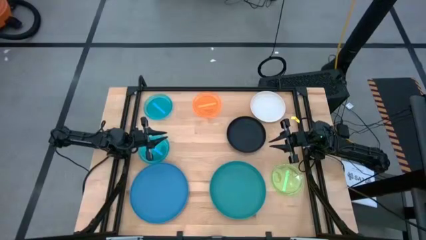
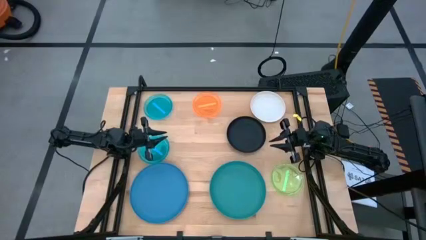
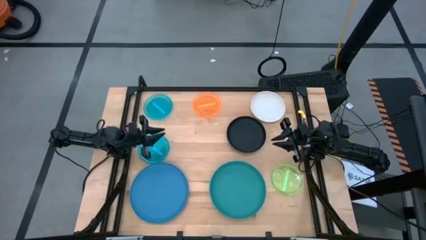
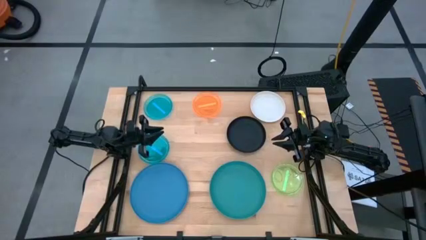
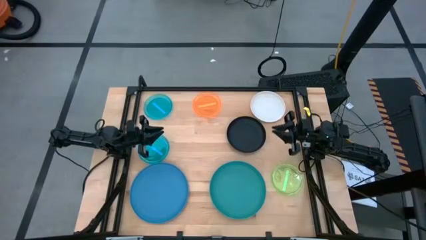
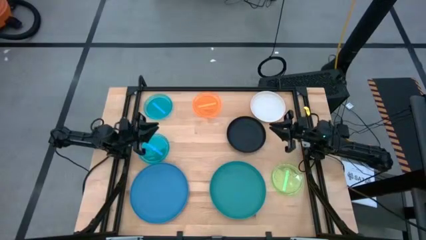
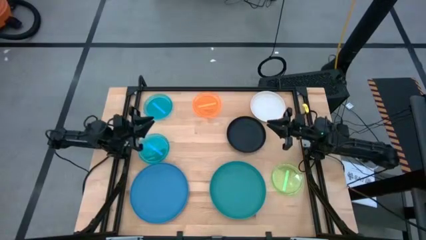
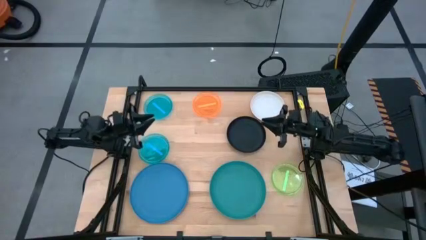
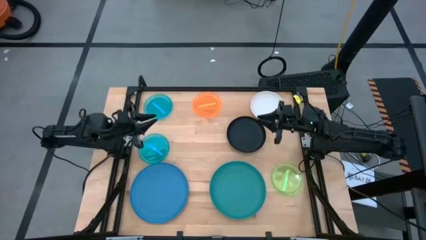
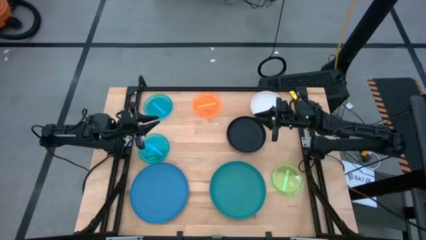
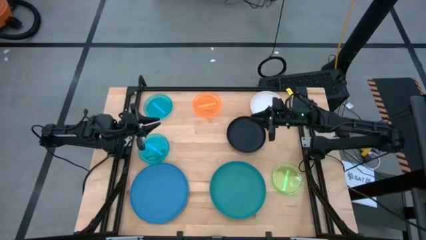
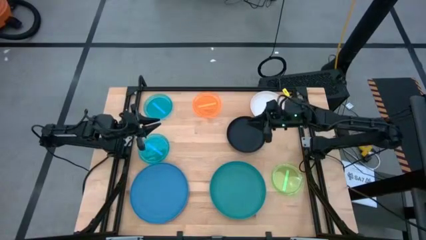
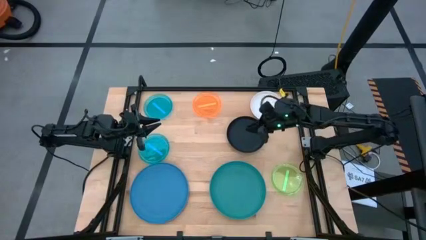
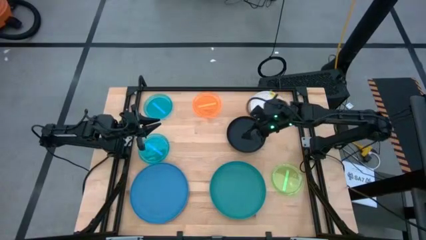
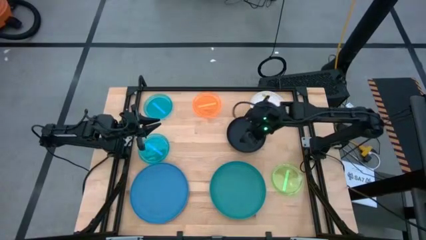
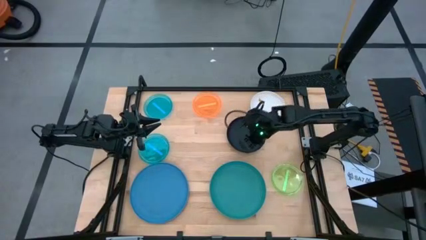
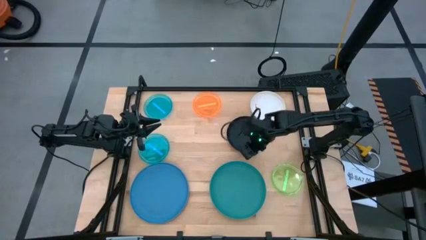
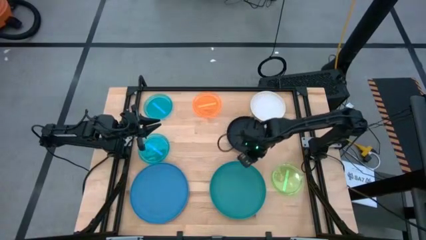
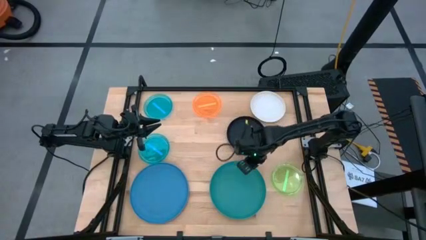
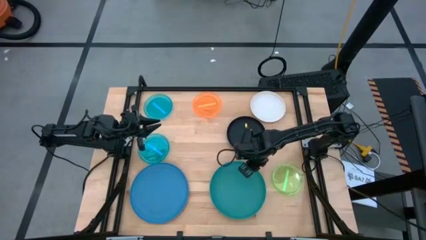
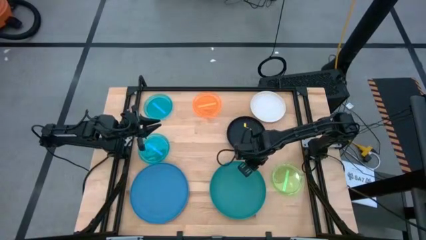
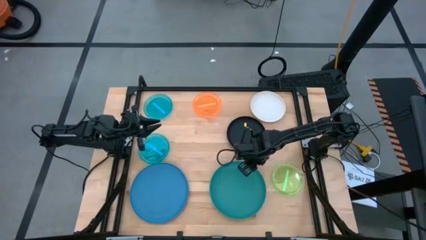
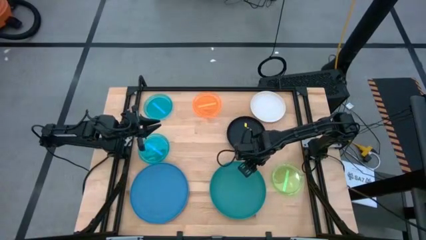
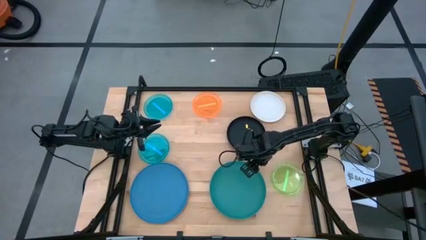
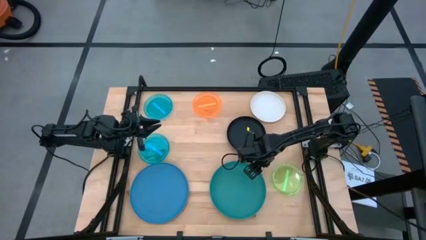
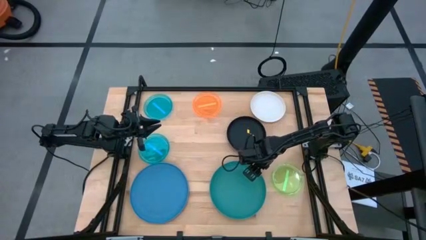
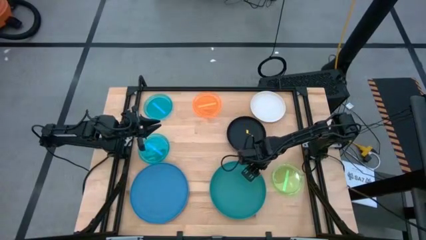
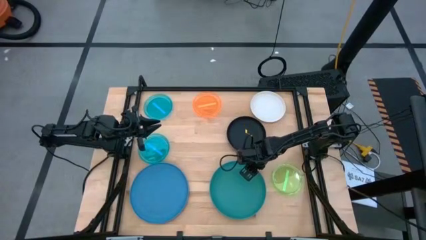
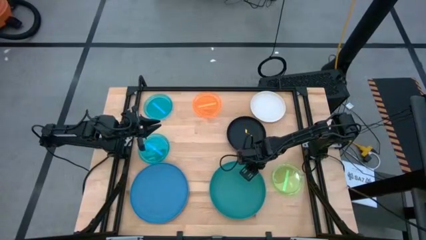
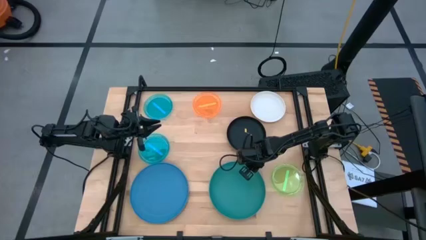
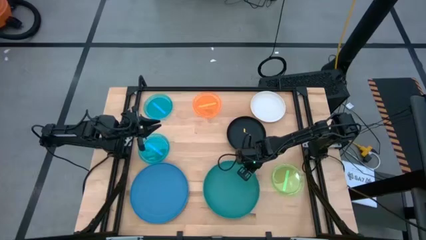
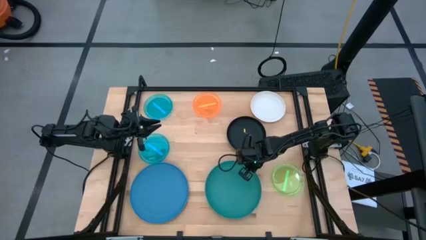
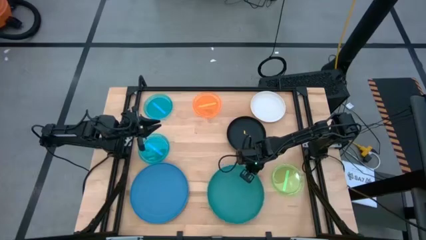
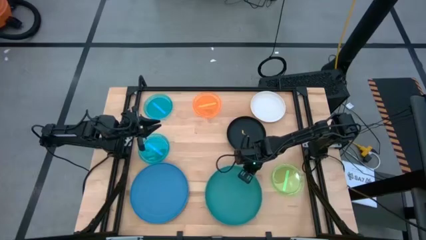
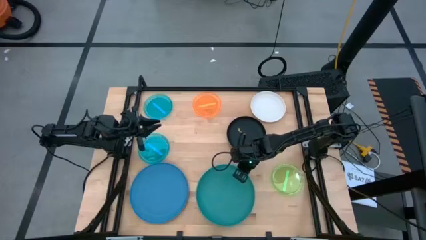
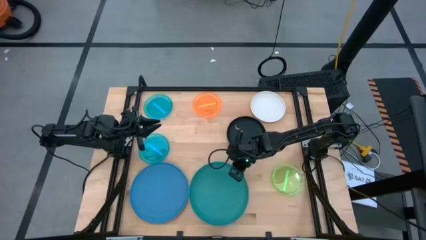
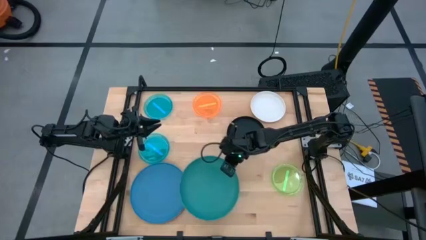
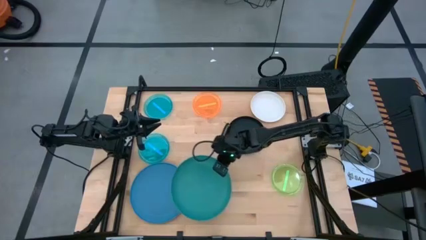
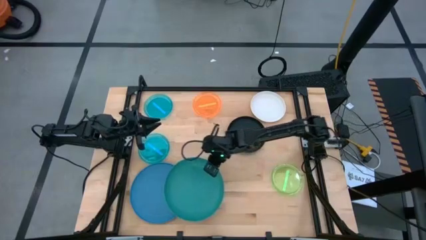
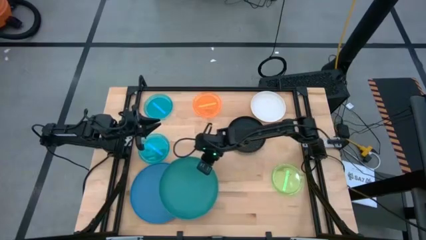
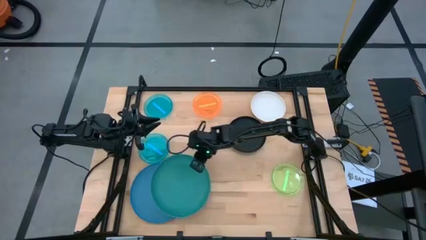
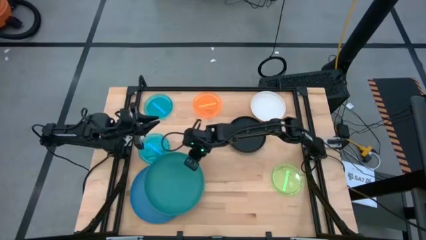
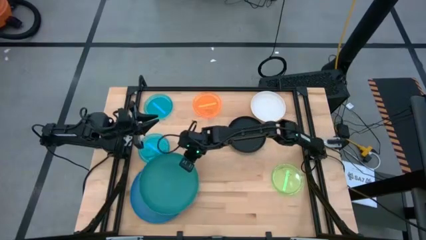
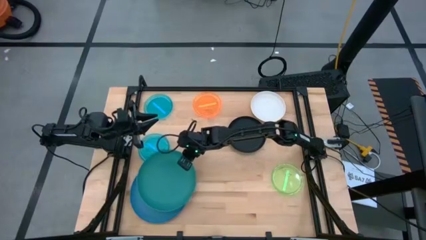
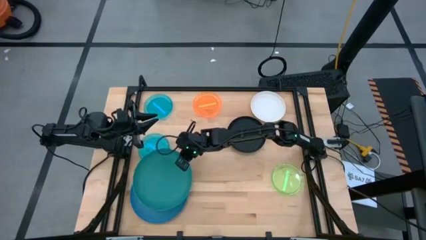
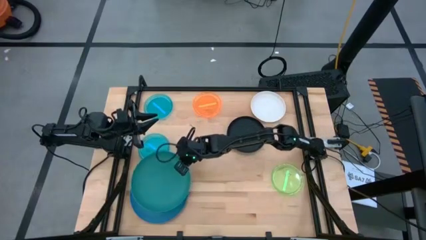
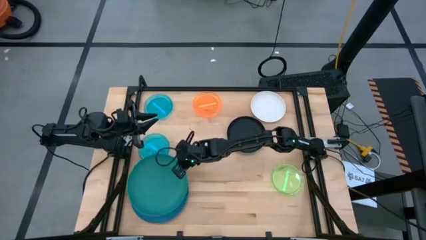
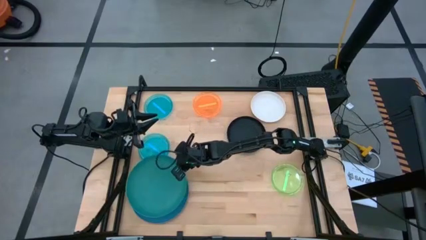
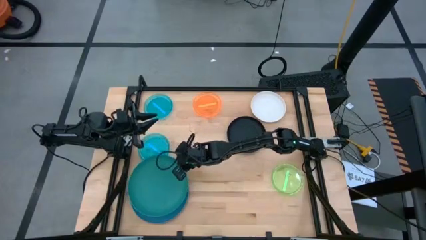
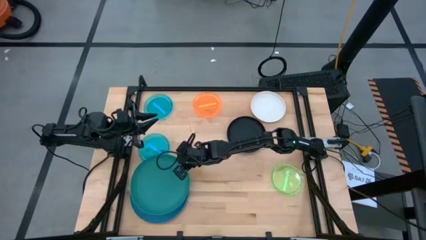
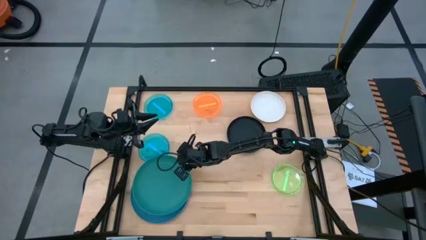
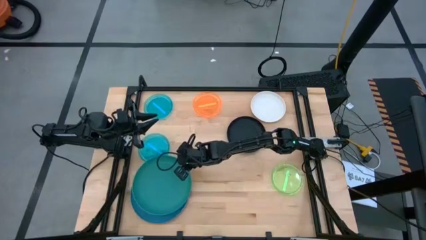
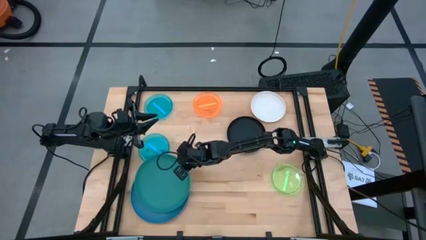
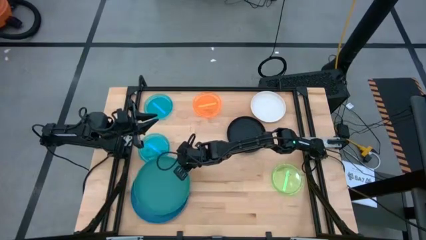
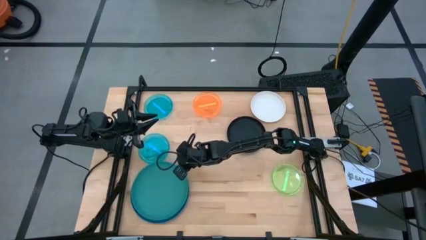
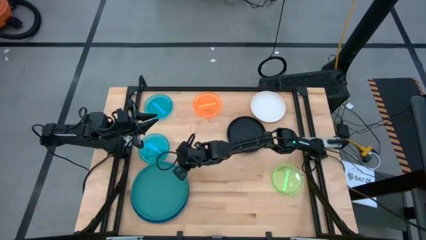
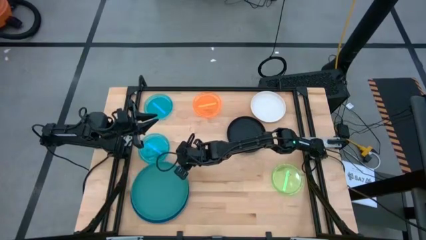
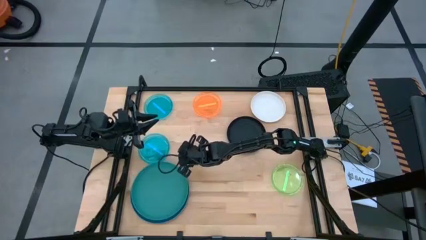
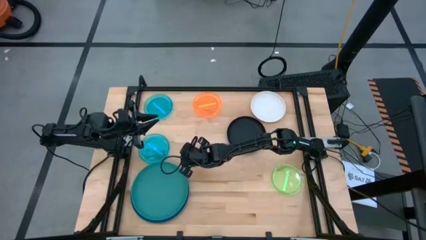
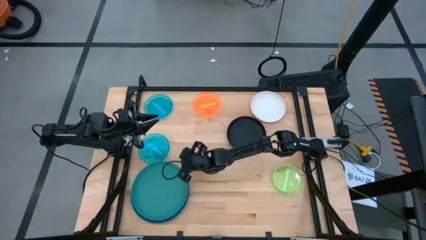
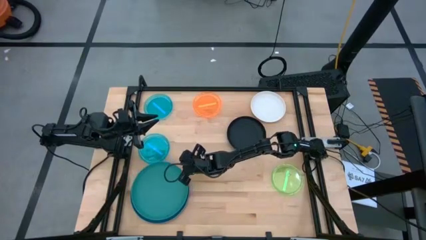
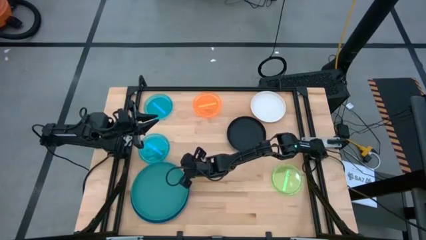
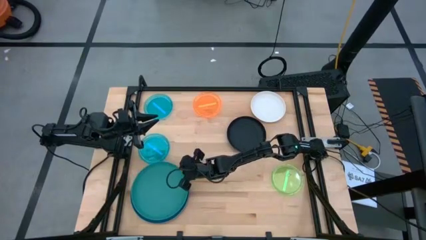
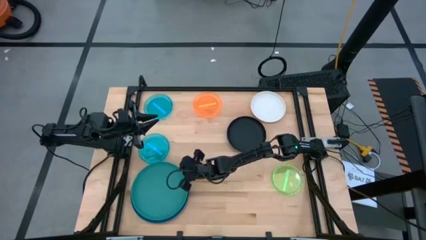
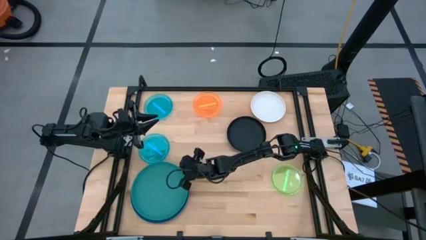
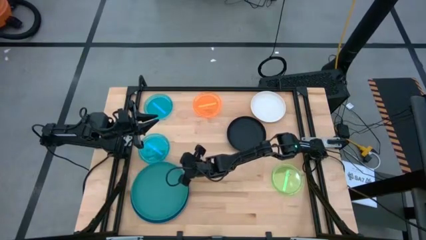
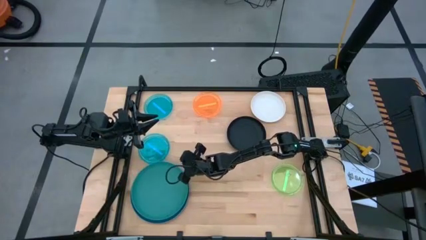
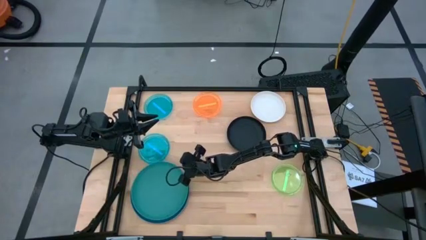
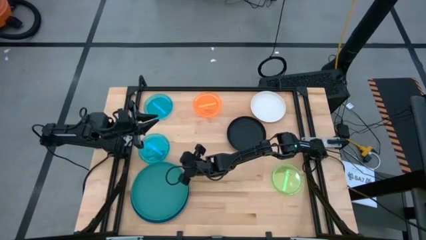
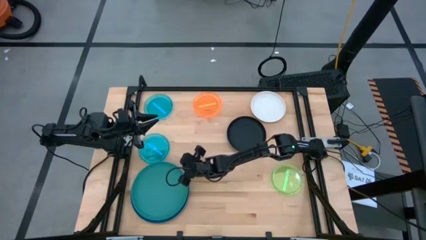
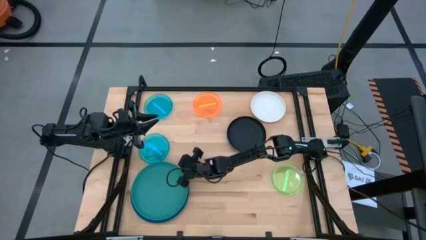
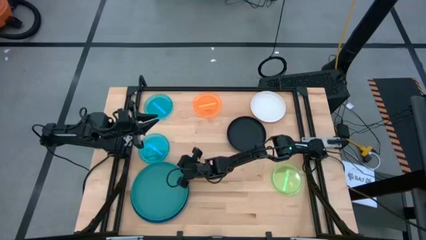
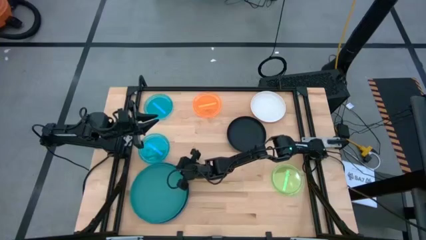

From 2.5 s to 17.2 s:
Task: Stack plastic plates
Stack the green plate on top of the blue plate
